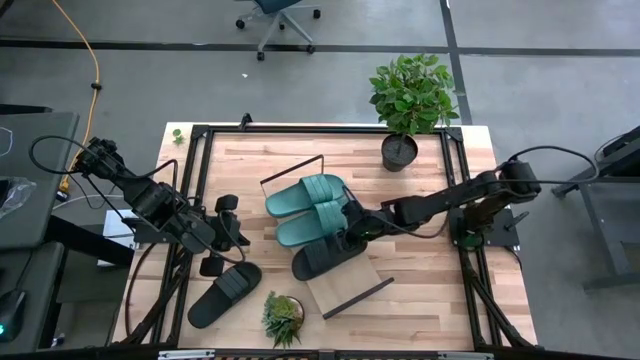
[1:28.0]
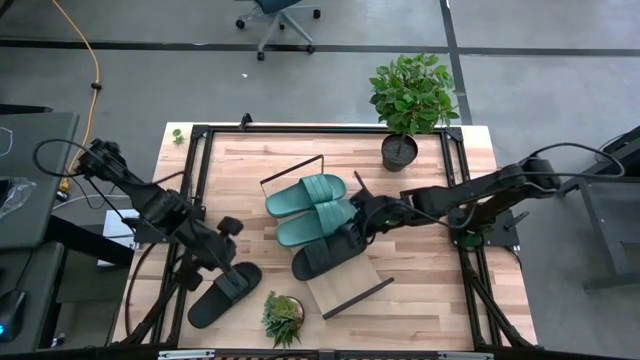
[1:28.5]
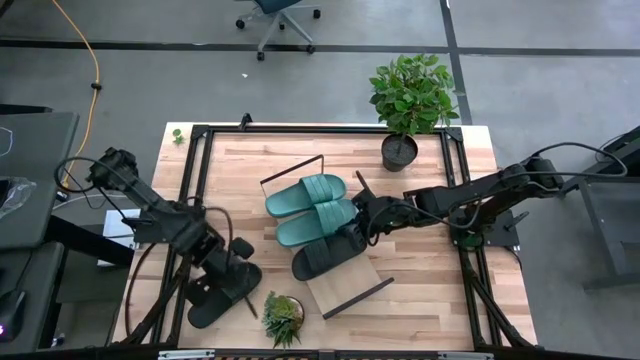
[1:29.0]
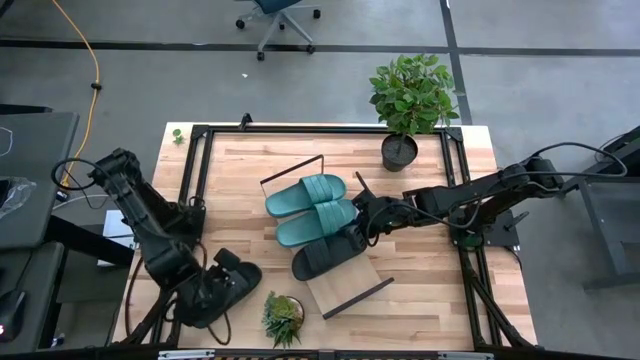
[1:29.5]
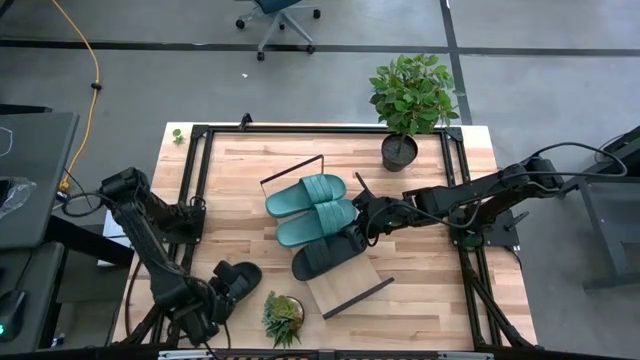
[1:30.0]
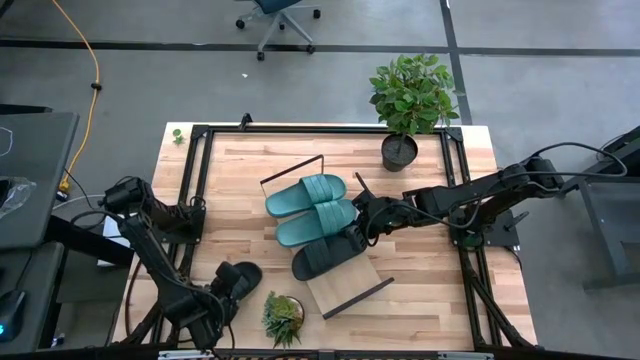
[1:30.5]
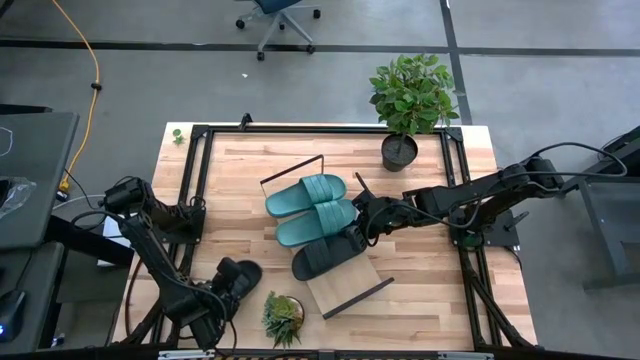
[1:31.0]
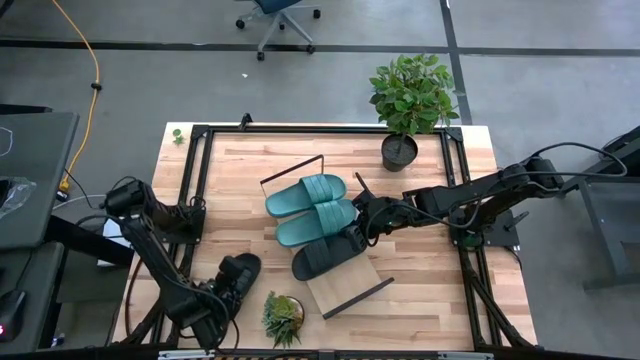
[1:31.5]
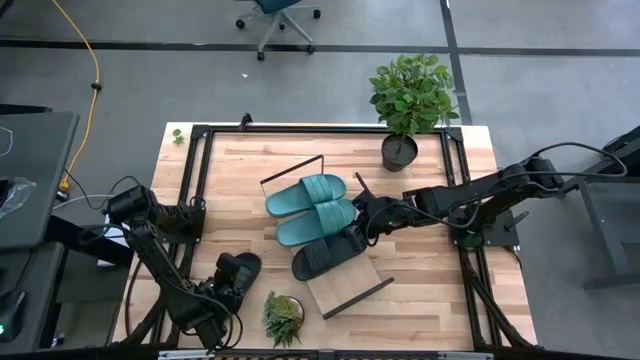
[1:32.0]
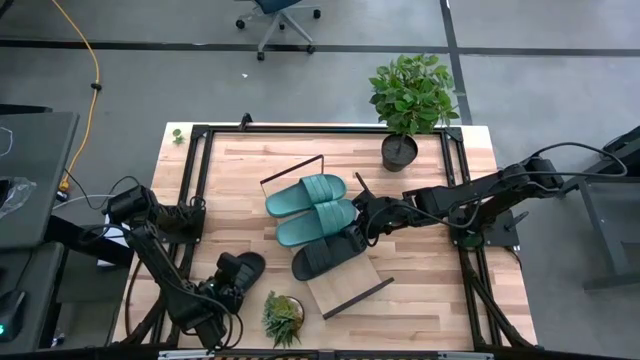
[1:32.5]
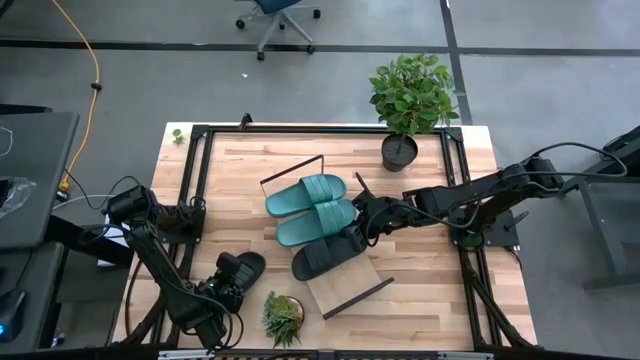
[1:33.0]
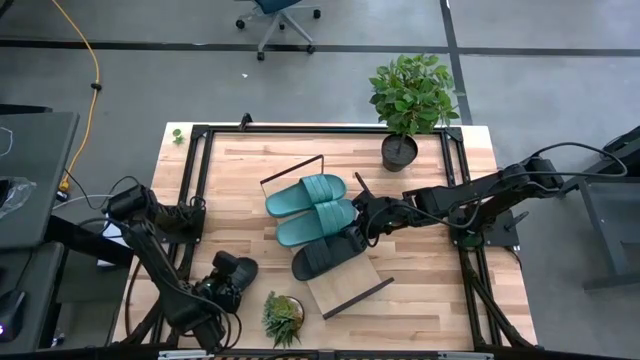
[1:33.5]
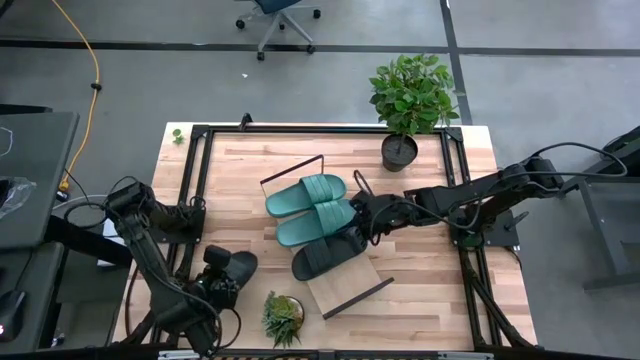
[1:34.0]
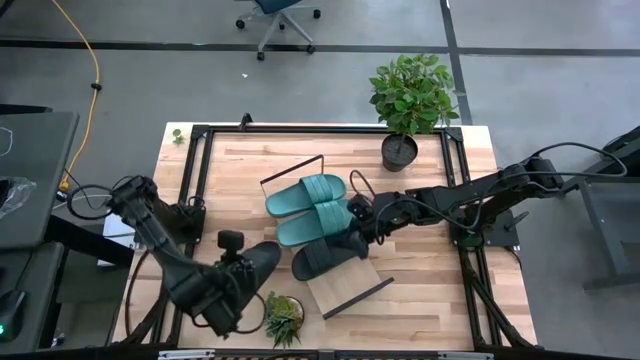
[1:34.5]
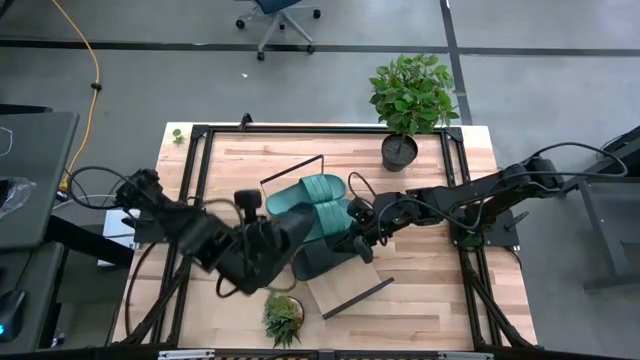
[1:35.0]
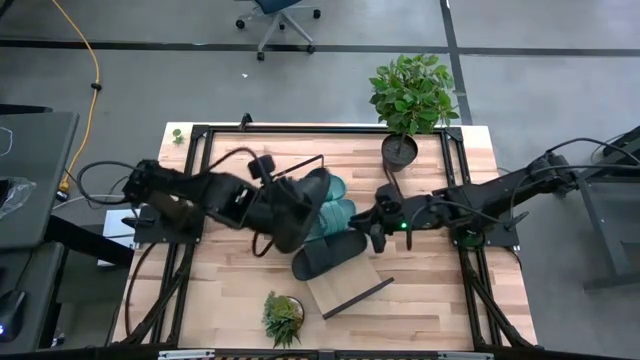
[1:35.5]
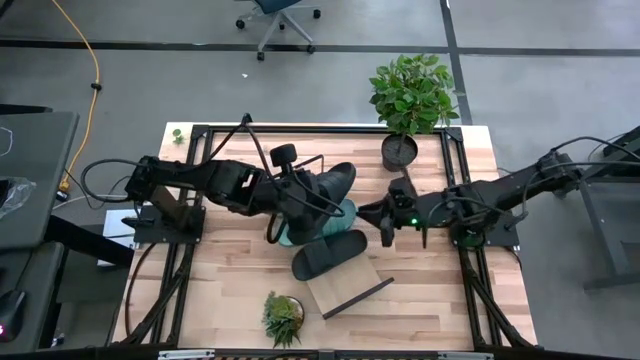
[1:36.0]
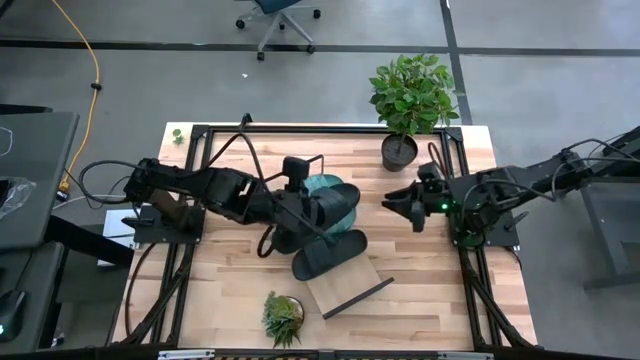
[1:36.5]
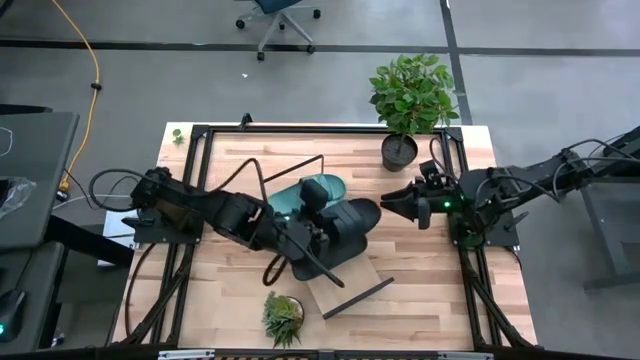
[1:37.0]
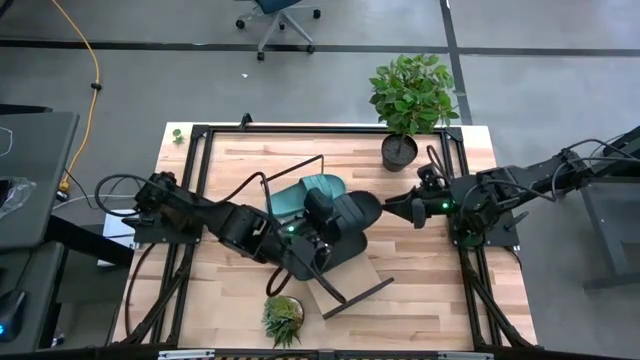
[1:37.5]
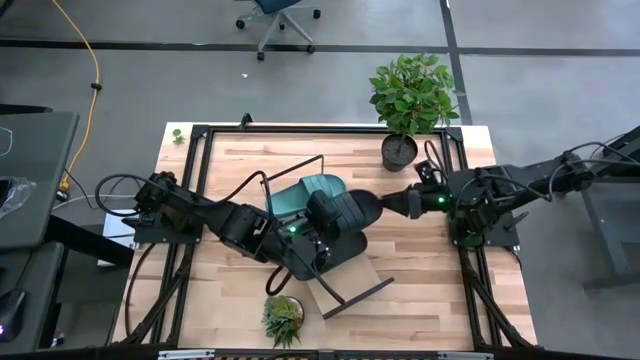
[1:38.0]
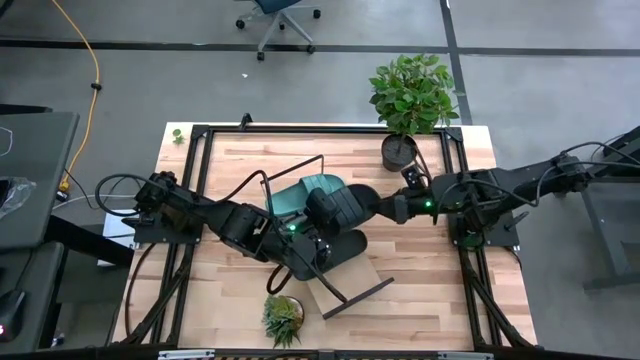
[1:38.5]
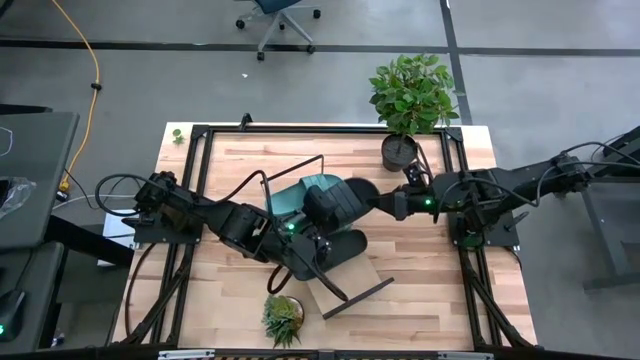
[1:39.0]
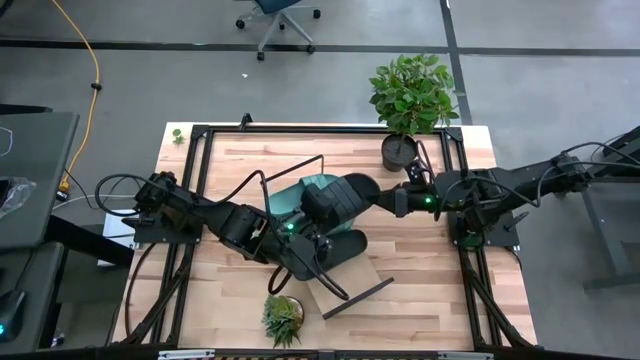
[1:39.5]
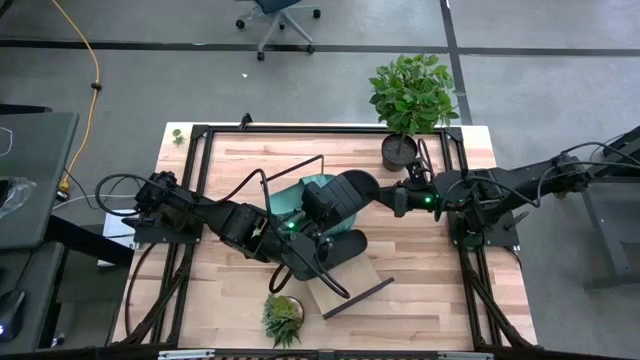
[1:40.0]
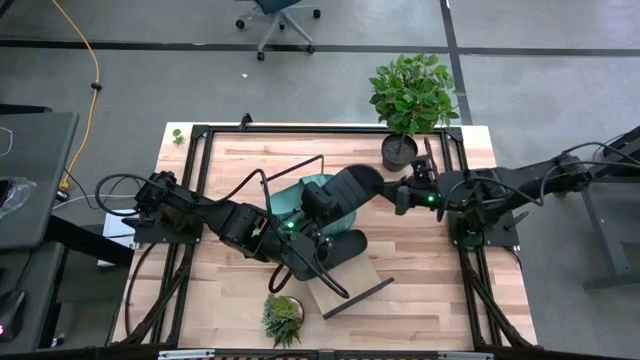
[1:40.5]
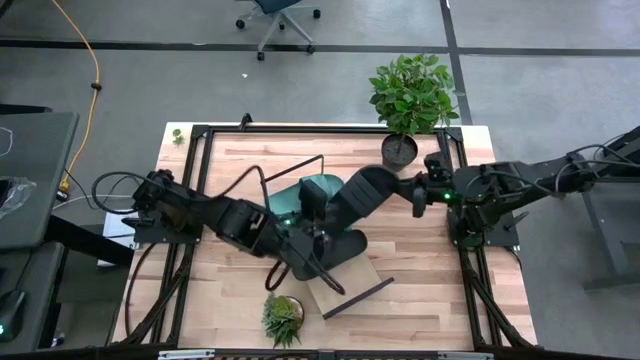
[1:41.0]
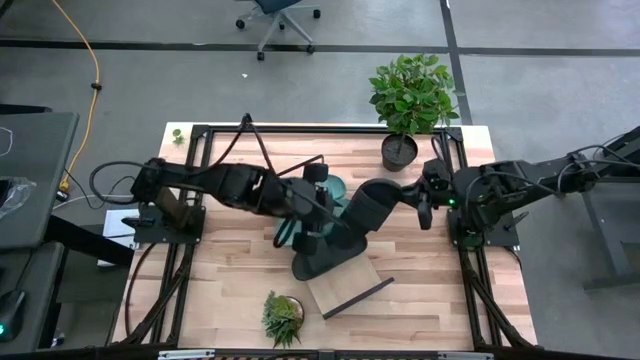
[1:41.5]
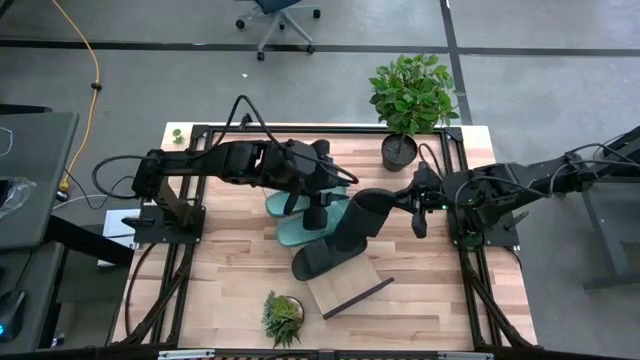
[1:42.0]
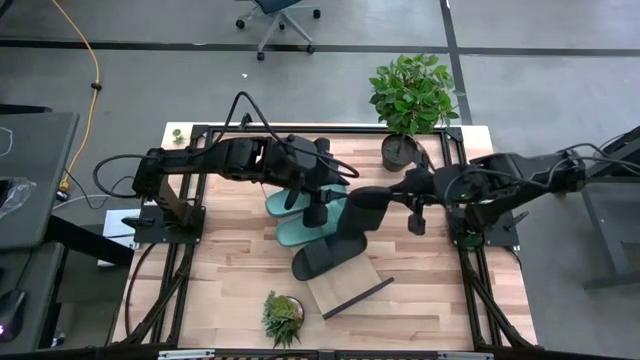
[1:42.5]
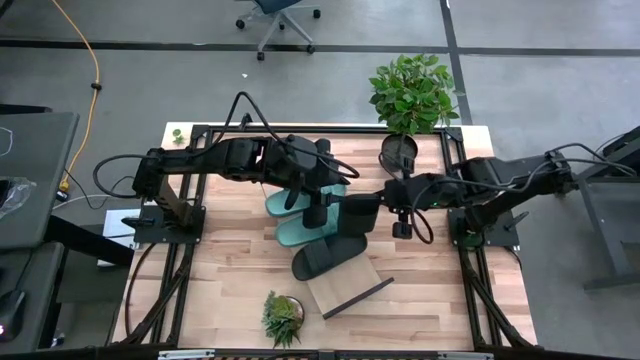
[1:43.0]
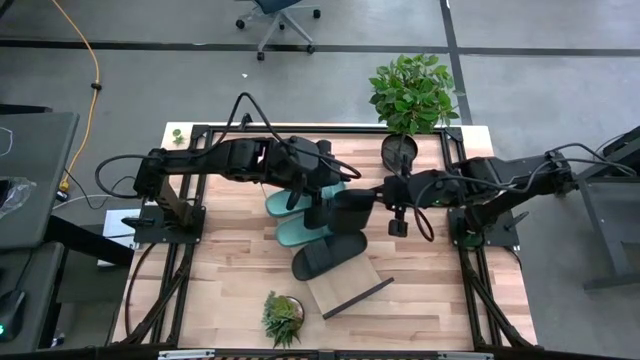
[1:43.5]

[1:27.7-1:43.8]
Task: Pick and place slides into the shelf
Put the black slide on the shelf
